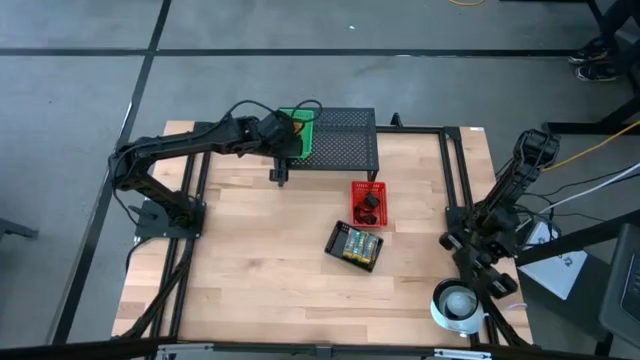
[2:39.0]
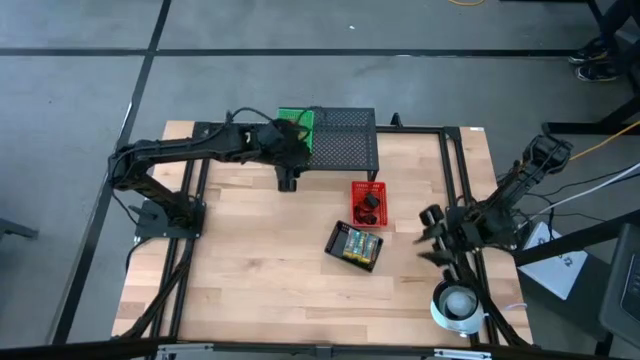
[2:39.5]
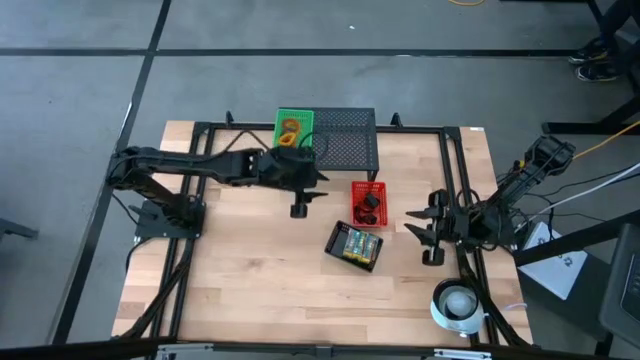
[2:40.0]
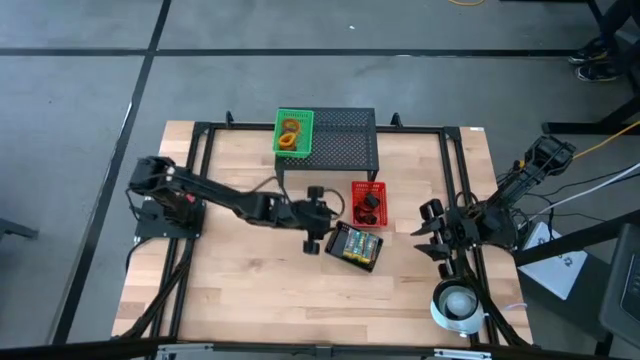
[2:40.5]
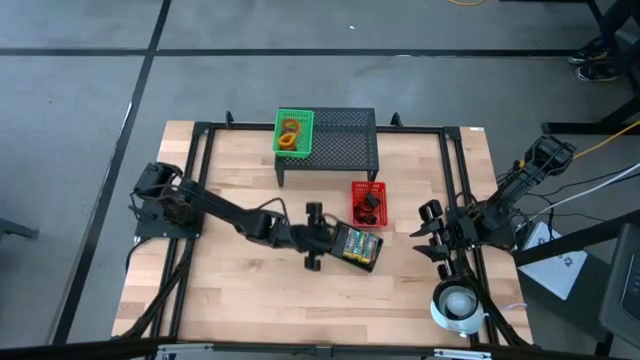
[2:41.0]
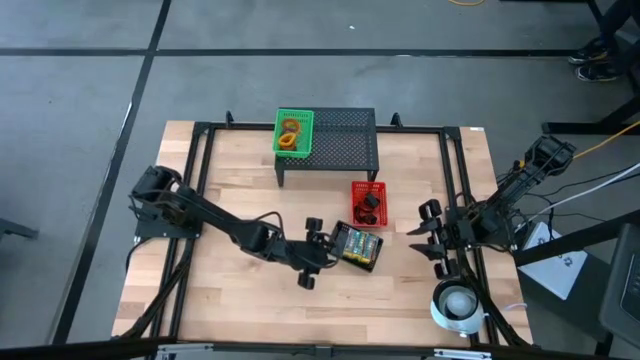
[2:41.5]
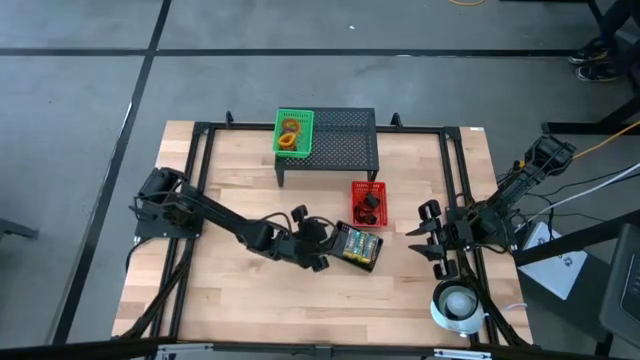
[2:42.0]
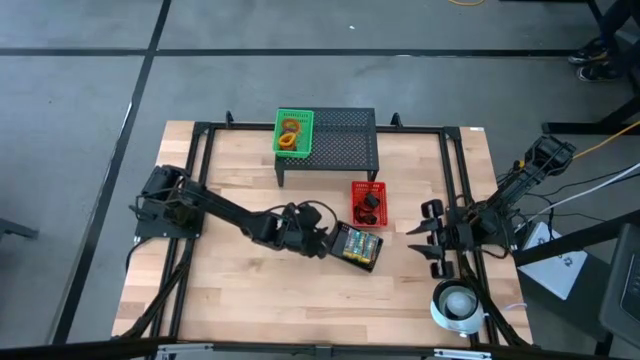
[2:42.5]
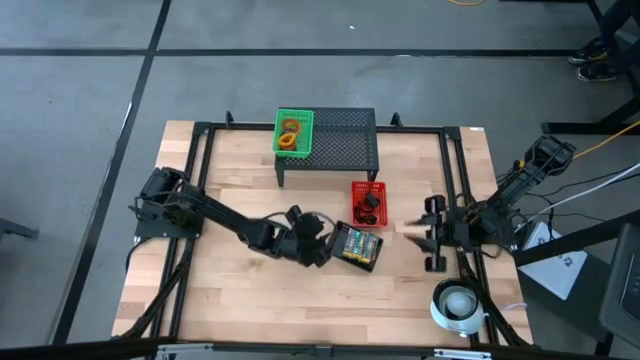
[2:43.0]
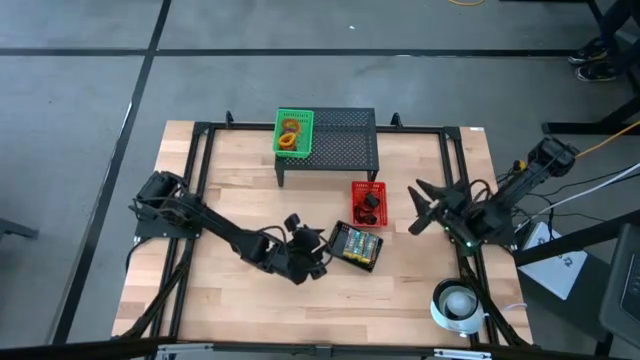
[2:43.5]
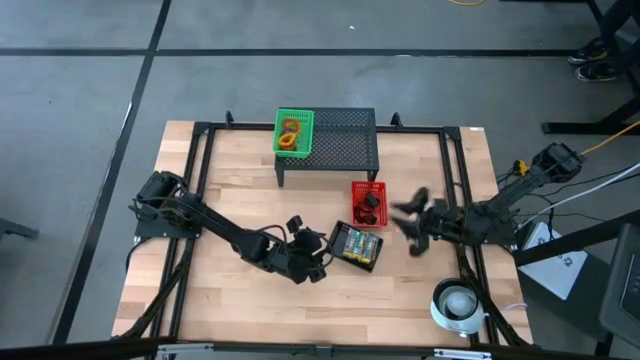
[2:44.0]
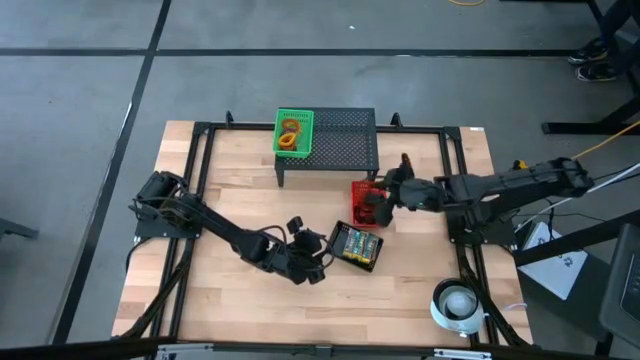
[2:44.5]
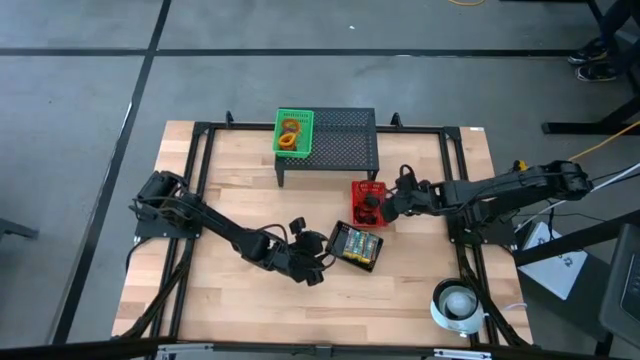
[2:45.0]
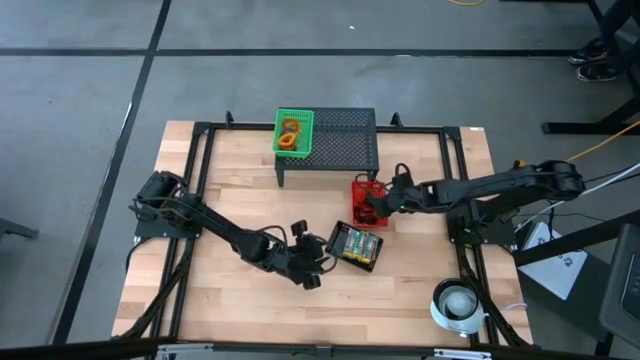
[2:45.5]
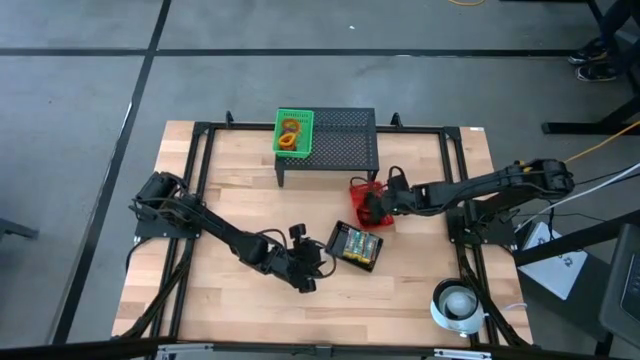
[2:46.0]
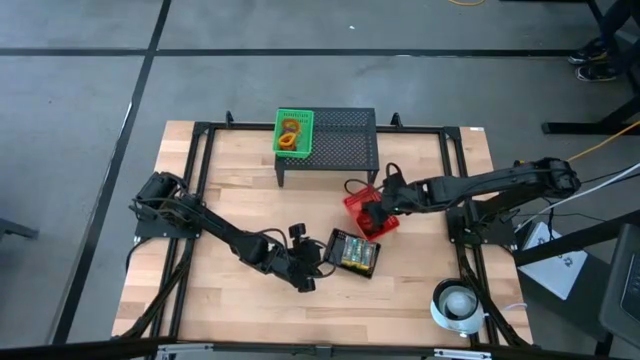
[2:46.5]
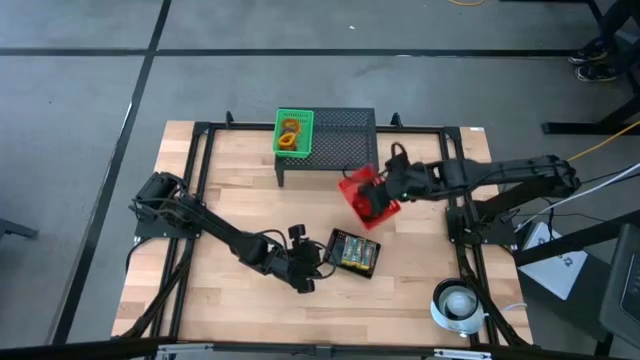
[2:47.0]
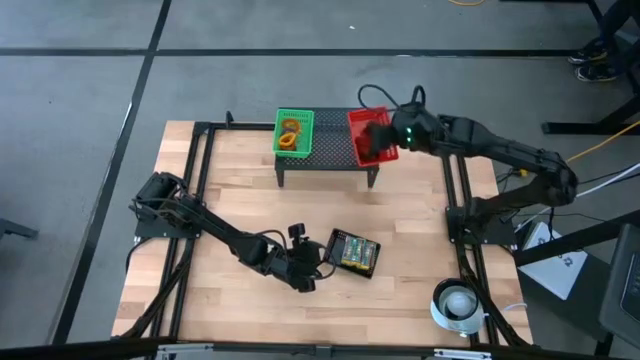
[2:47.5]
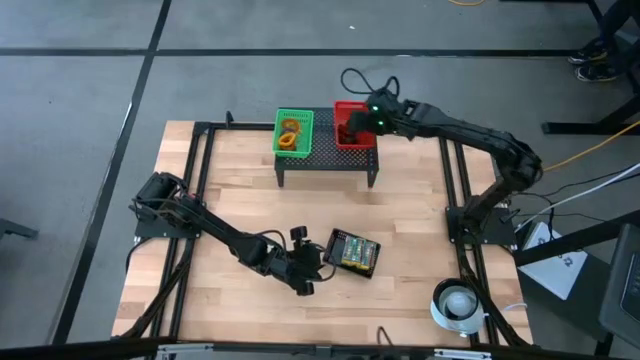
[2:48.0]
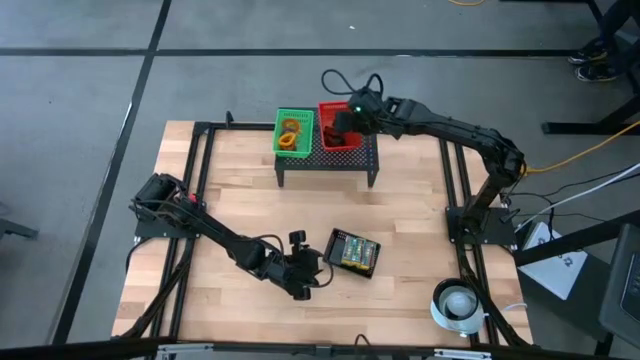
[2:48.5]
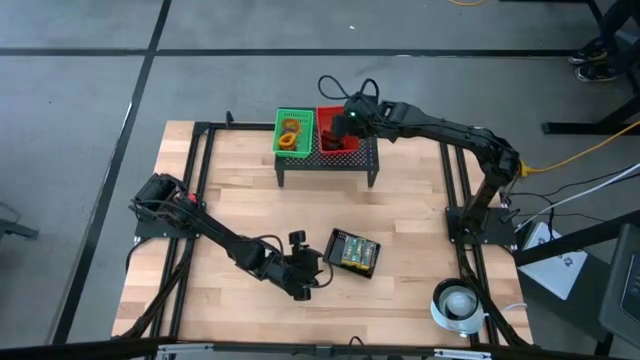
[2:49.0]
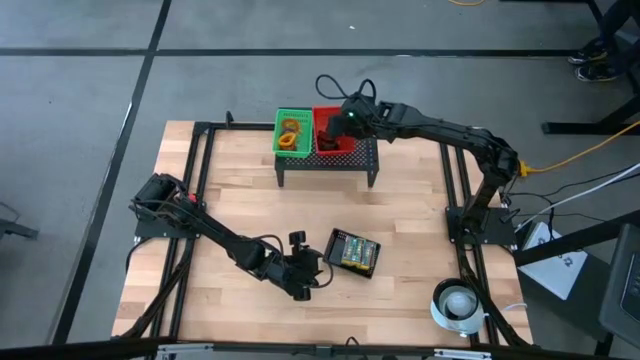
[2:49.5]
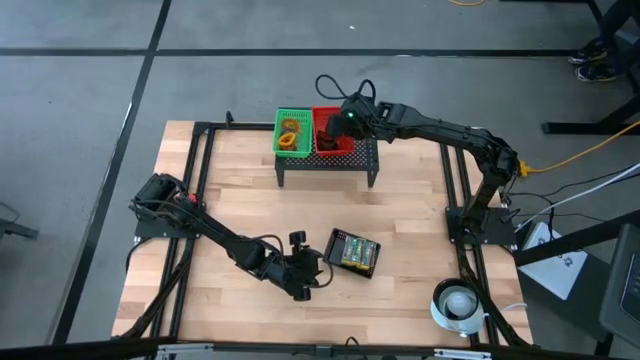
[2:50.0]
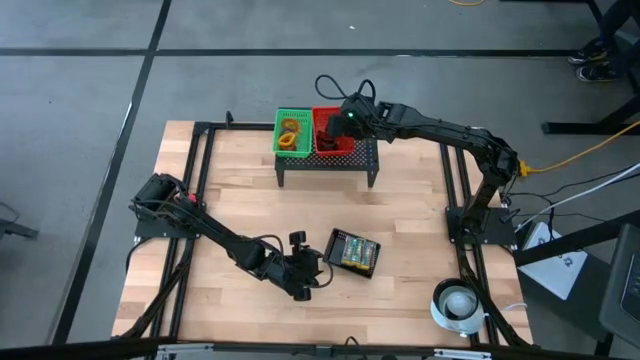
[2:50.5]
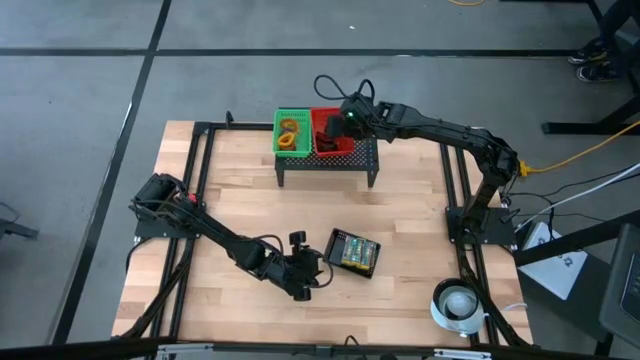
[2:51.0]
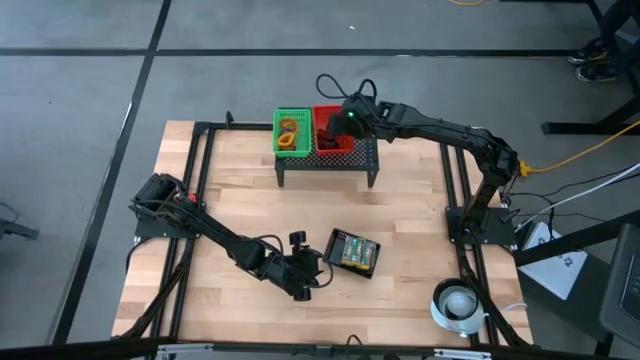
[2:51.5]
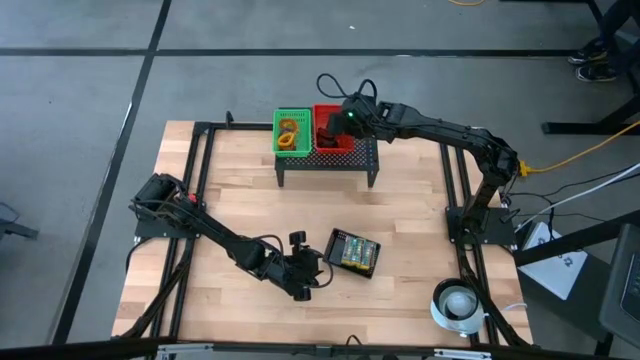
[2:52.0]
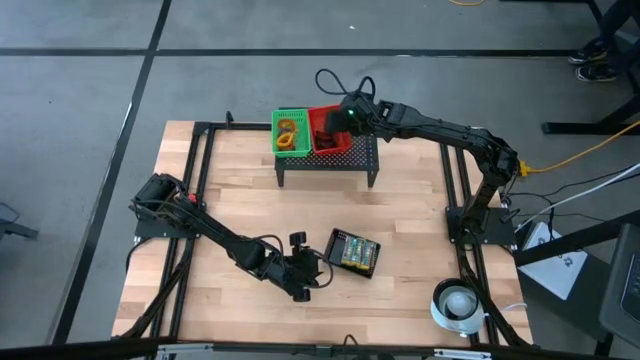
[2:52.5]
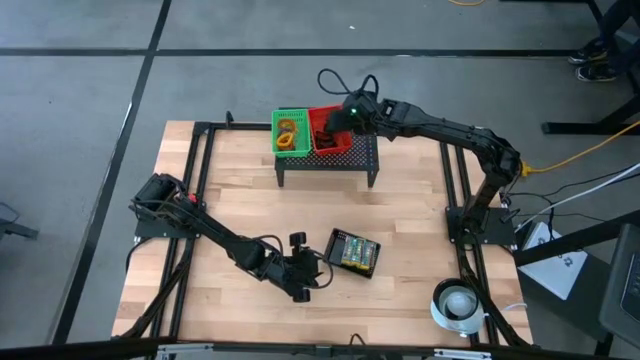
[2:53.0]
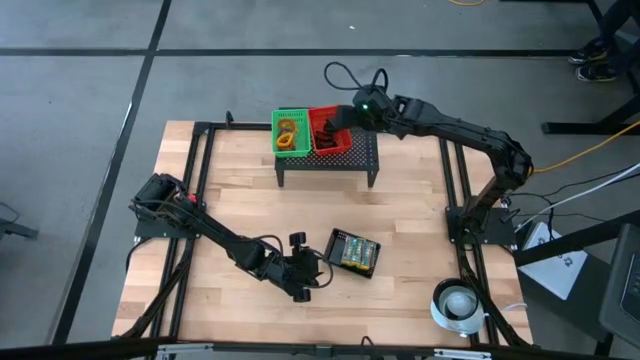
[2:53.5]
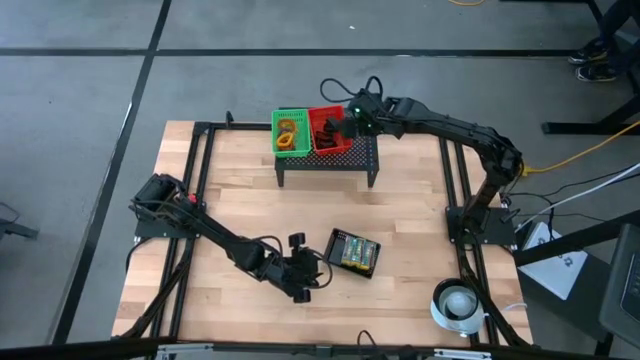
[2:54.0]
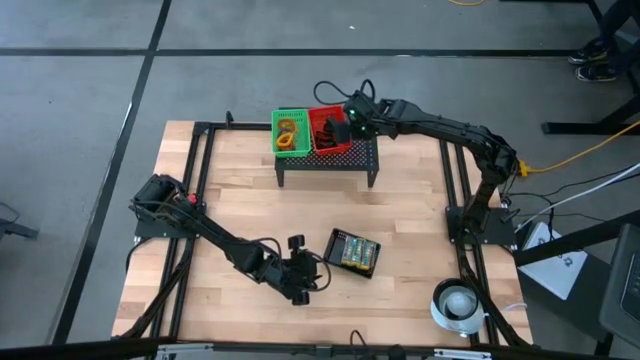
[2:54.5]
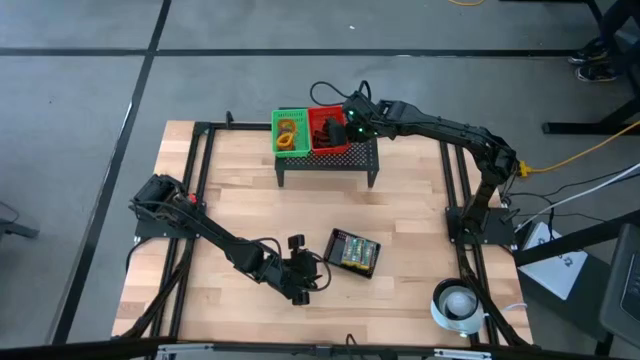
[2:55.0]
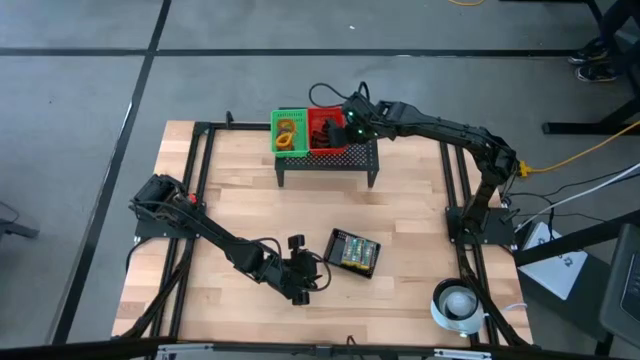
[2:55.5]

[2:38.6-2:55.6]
Task: Pick & Place Office Desk Supplies
Put the red bin on the shelf

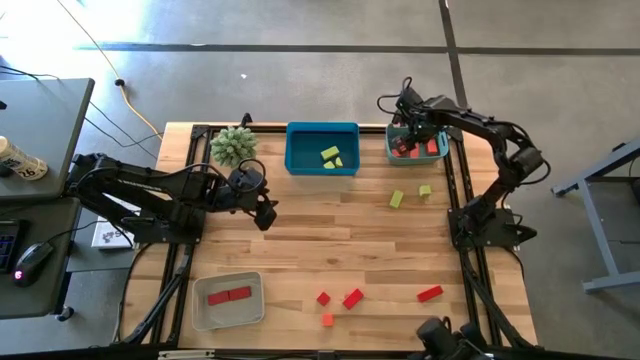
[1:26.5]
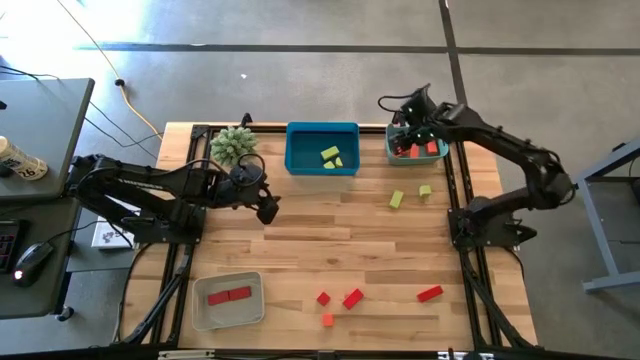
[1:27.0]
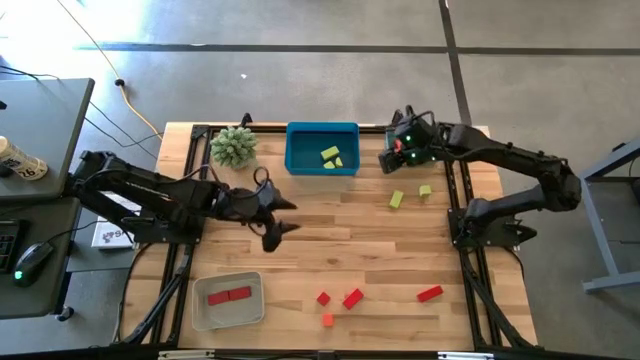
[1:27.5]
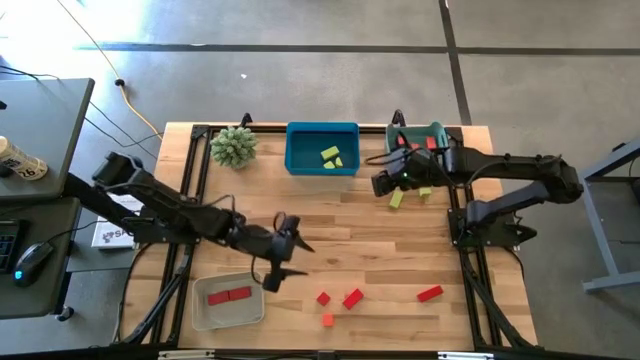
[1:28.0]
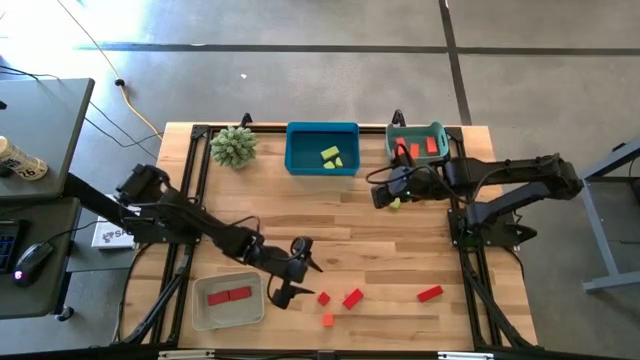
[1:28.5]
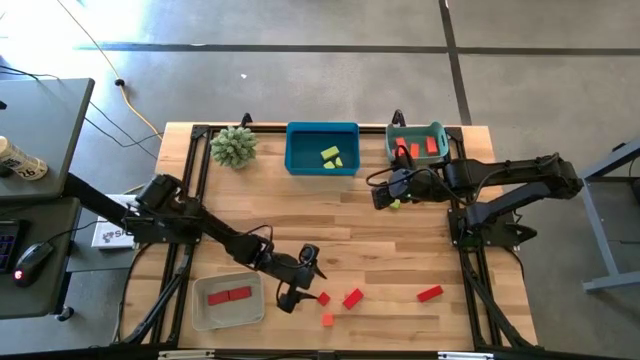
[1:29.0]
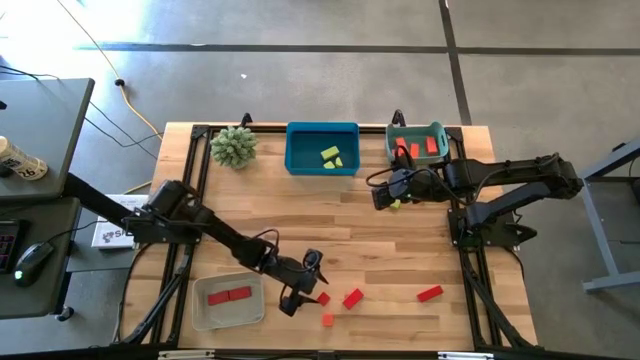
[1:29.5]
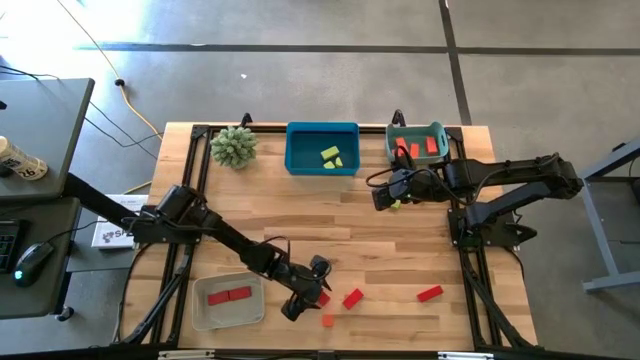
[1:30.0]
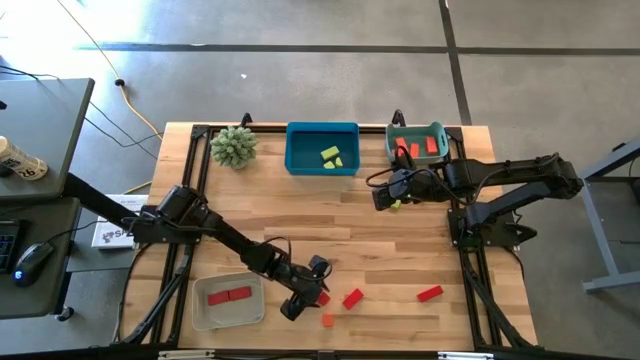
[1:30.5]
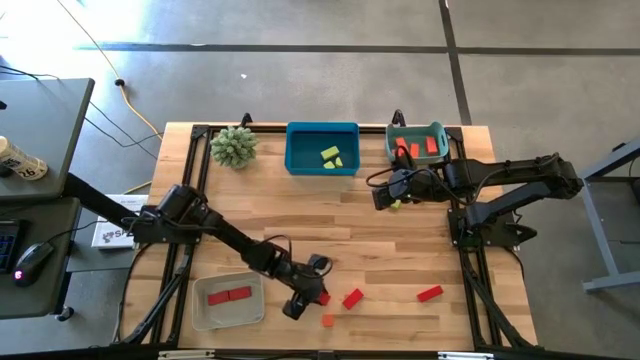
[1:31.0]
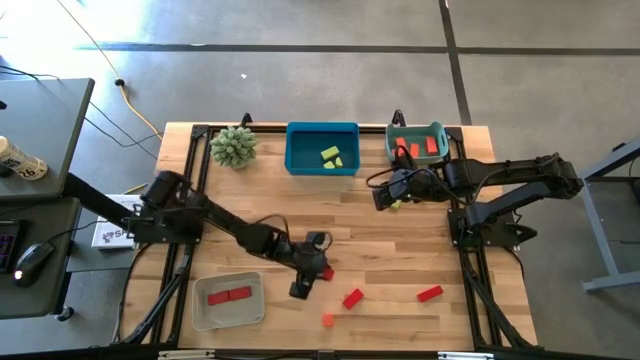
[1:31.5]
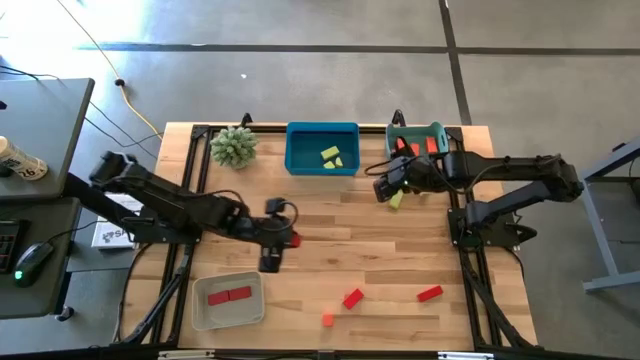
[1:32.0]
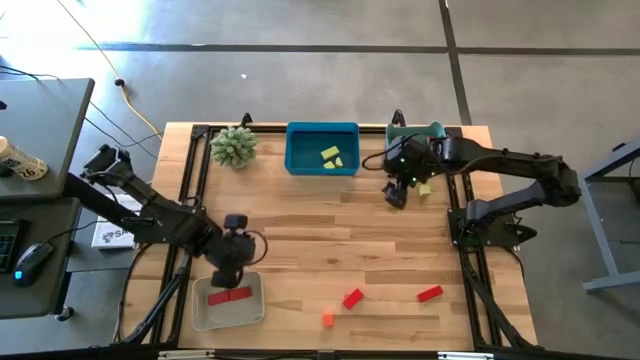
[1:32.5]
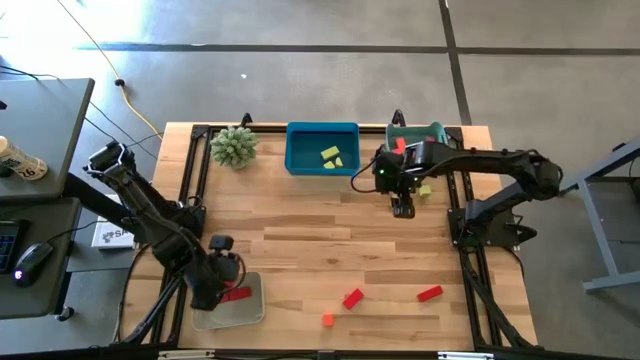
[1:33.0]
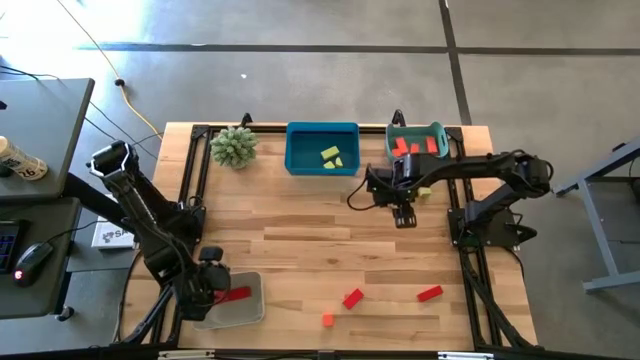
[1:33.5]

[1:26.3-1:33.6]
Task: Sort & place blocks by color
Put the red block into the gray bin
